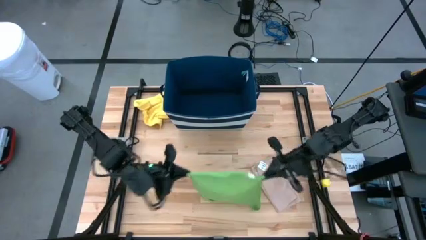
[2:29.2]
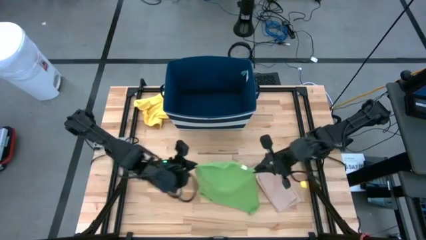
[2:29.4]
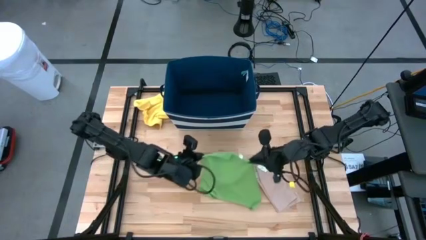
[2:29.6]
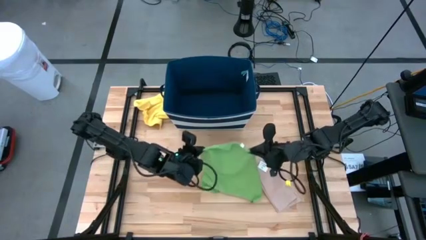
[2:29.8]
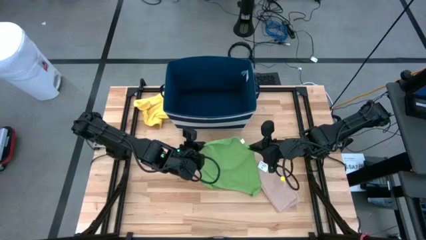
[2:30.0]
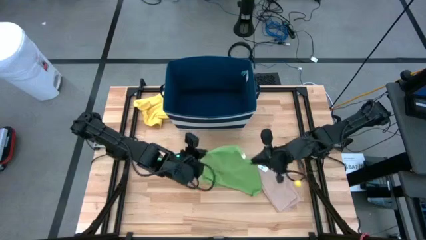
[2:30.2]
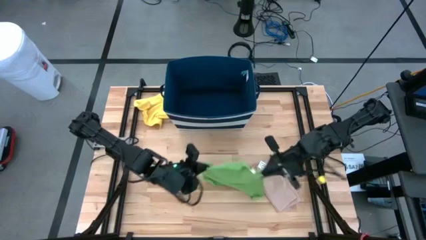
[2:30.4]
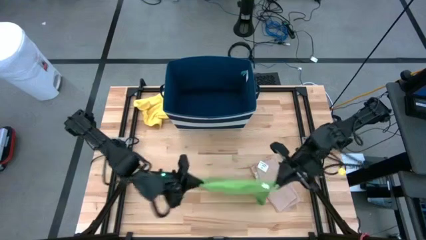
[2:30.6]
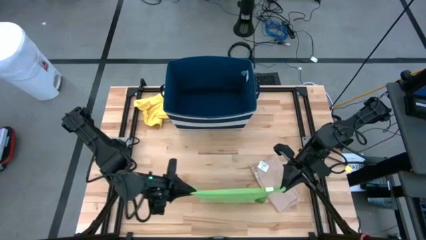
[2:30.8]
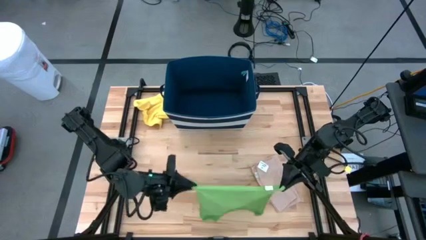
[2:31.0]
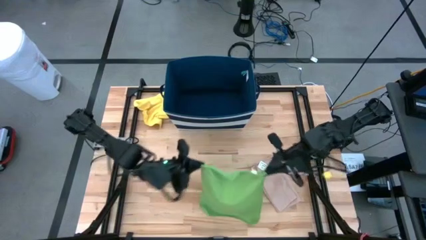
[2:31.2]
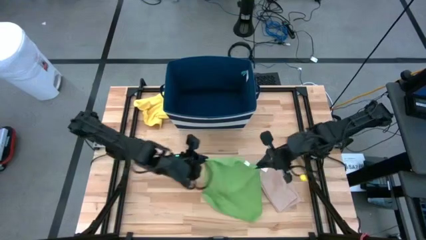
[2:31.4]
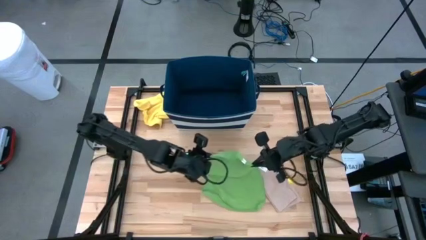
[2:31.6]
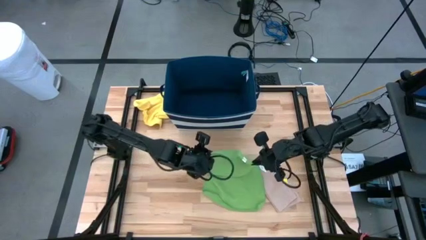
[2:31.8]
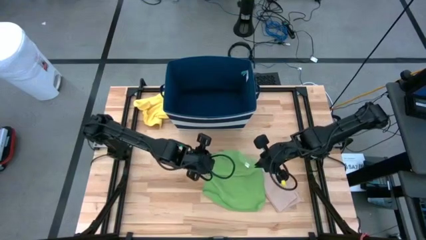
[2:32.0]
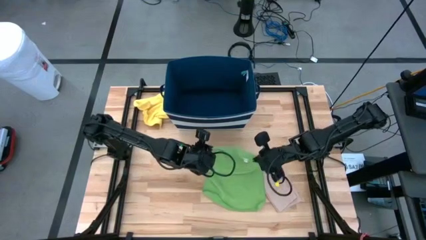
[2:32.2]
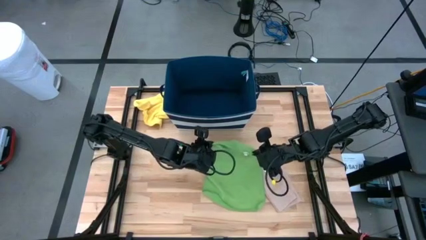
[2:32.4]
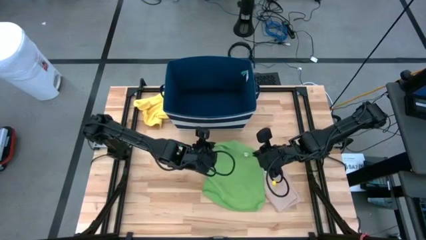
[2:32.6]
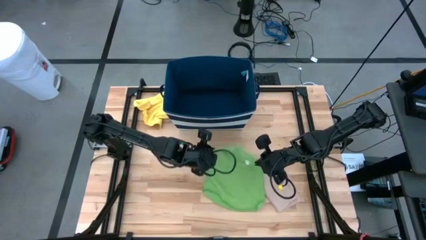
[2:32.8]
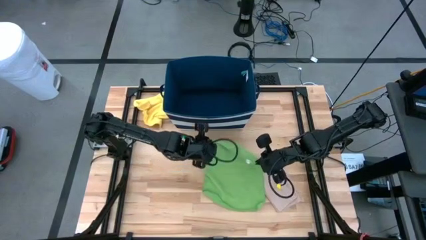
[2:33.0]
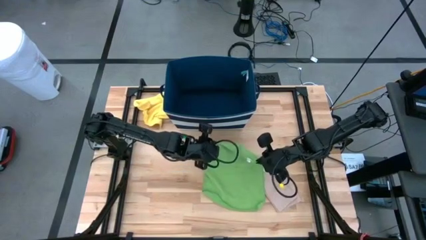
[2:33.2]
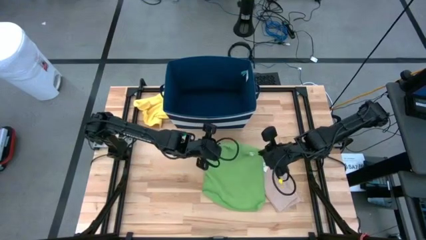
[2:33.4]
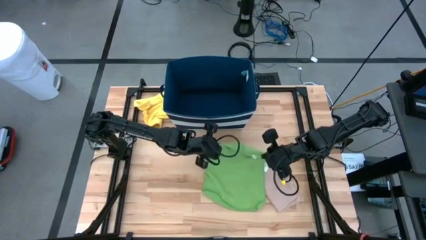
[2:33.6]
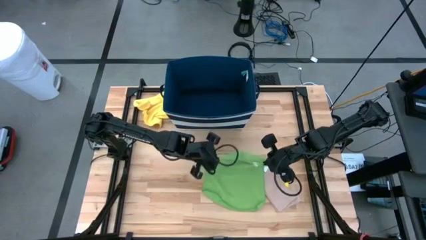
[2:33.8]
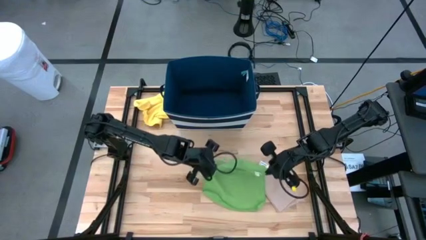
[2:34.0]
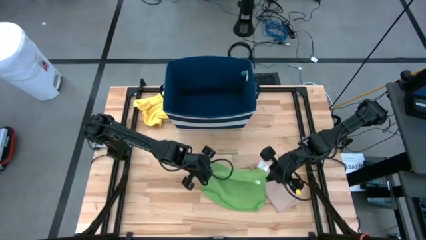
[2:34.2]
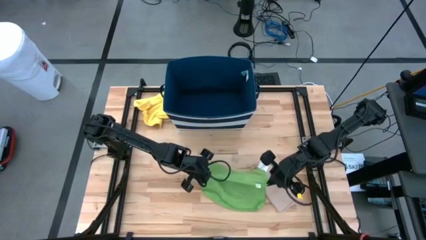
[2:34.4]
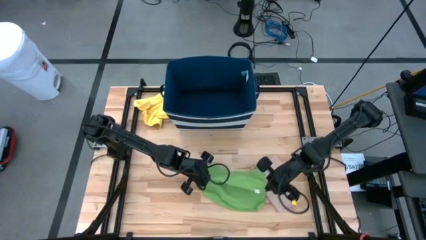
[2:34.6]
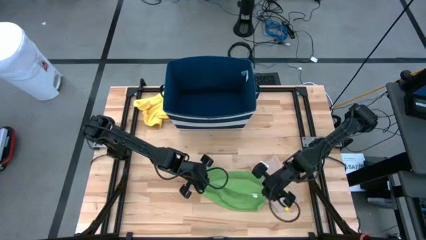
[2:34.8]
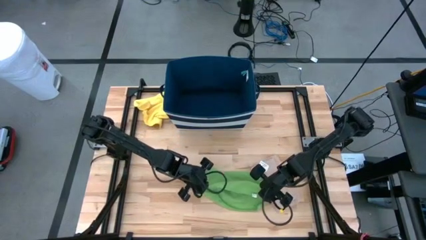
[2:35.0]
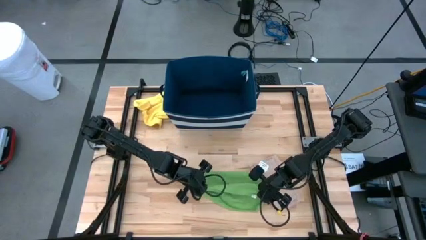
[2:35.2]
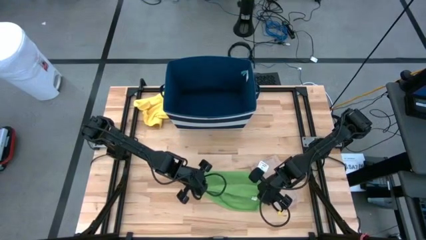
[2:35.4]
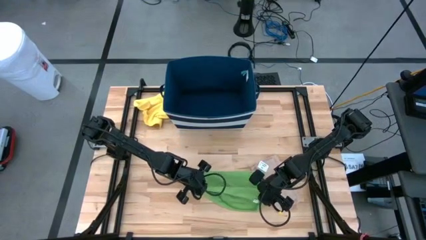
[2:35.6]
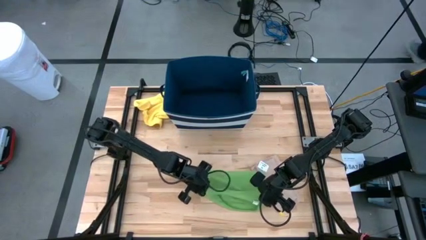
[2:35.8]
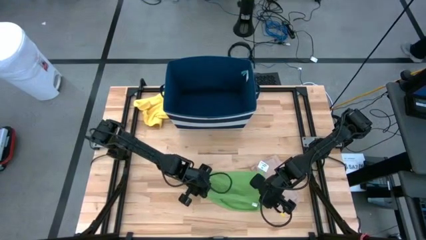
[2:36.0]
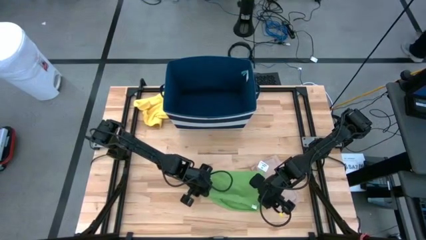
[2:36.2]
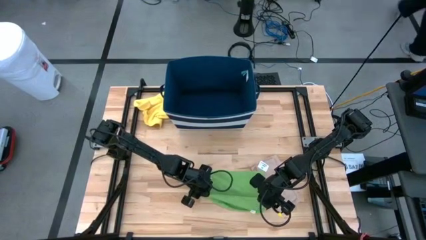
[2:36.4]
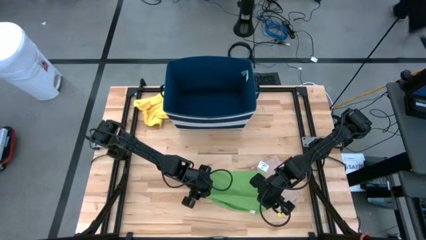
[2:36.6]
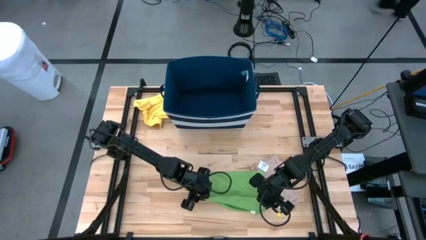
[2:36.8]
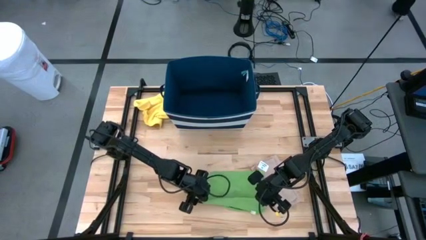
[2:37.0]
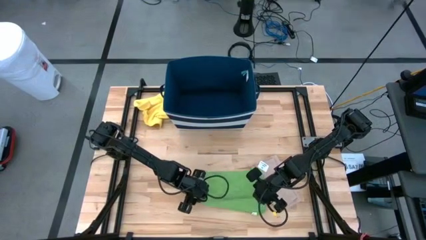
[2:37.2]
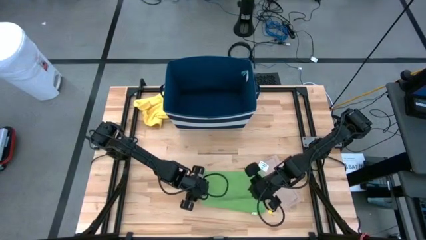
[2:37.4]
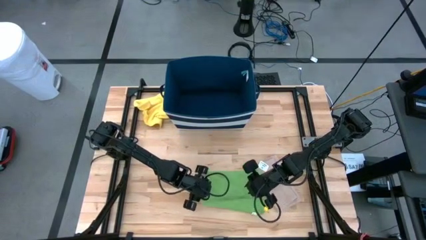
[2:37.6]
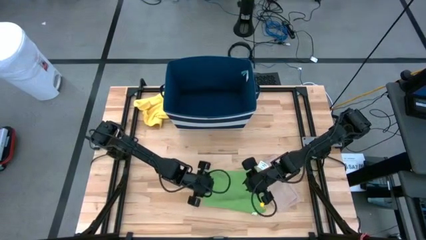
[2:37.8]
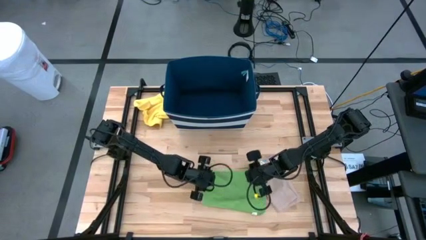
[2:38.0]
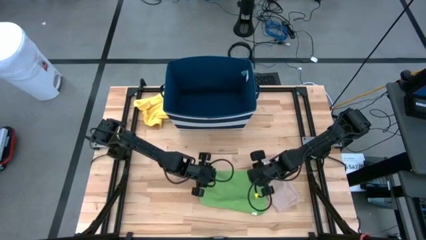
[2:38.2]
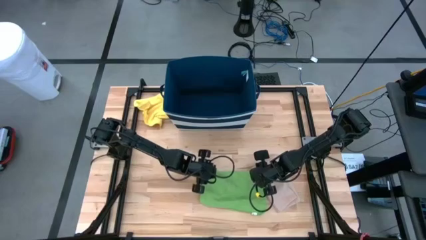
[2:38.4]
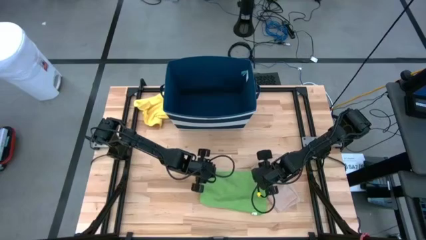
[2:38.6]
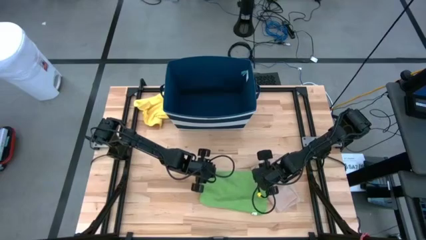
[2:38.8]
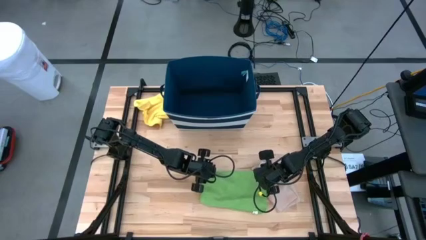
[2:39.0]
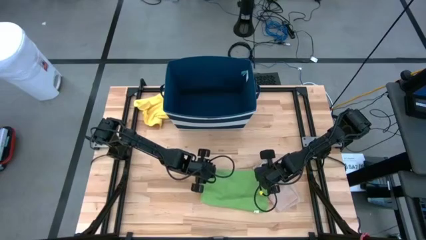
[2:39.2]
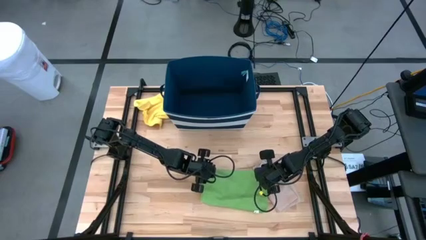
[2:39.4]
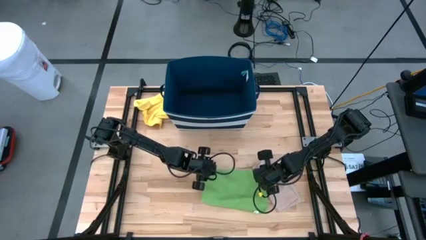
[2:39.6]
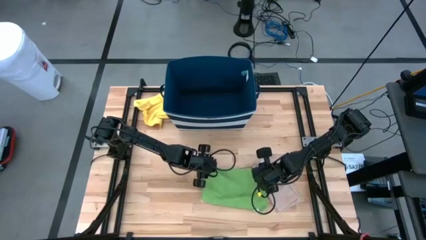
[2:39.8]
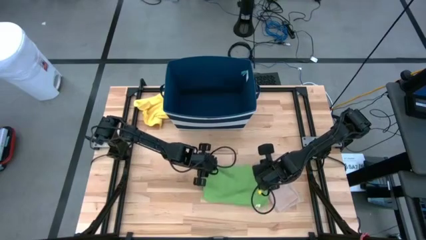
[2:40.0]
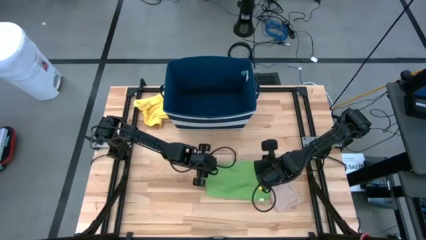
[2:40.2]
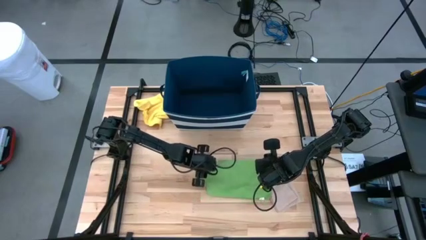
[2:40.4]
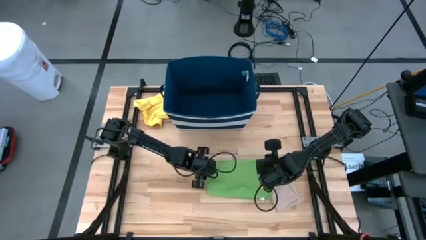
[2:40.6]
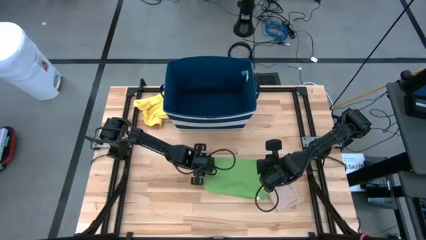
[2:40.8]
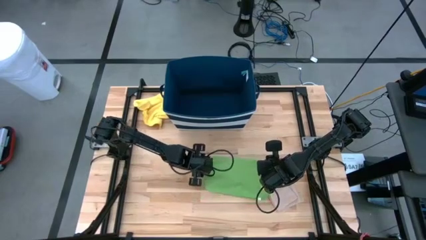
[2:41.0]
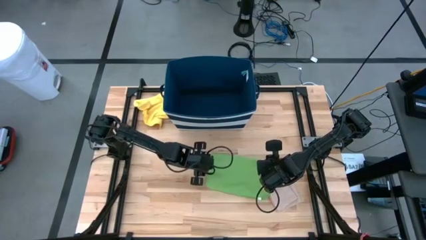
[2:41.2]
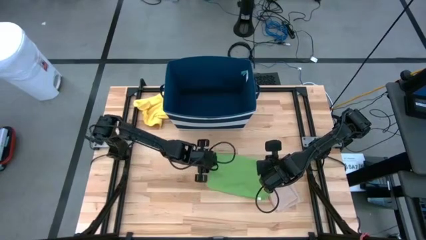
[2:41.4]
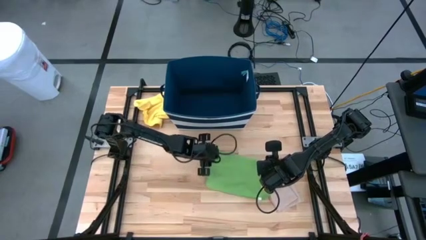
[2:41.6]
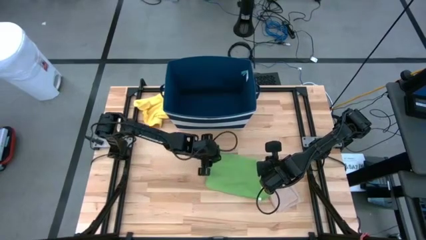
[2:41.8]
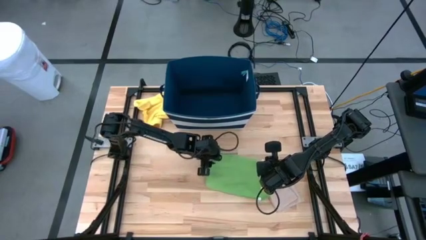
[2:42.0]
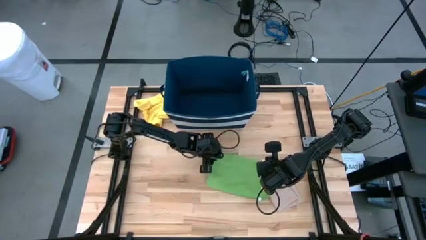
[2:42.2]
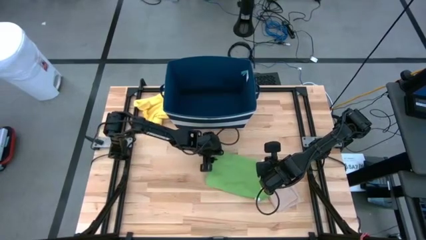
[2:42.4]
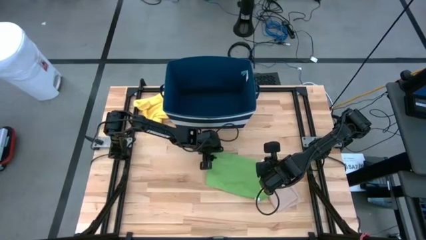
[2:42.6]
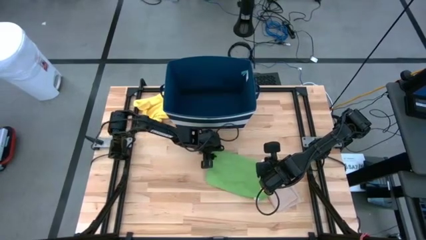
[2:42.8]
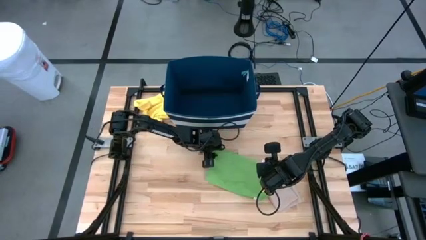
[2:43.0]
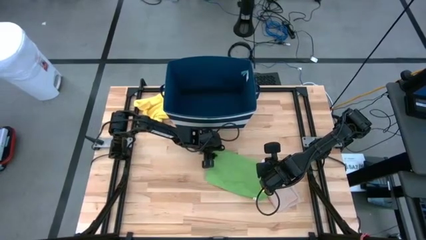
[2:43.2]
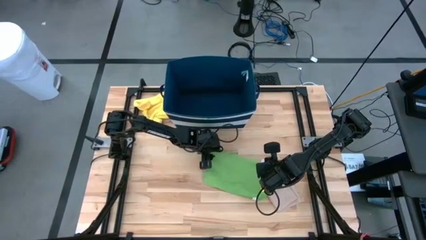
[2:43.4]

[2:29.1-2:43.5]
Task: Fold towel
Fold the green towel
